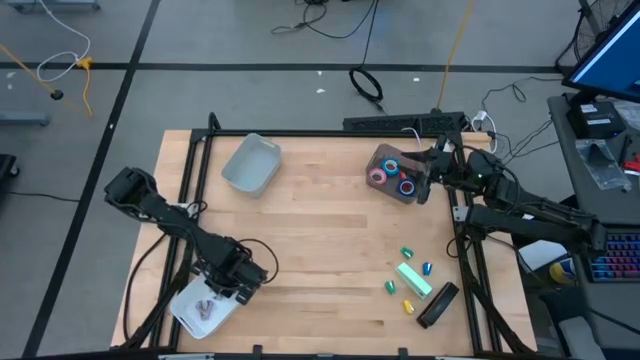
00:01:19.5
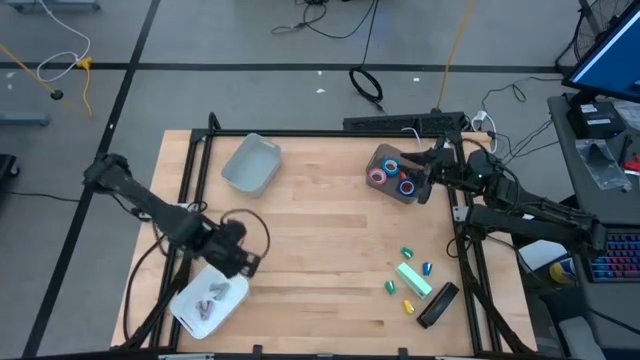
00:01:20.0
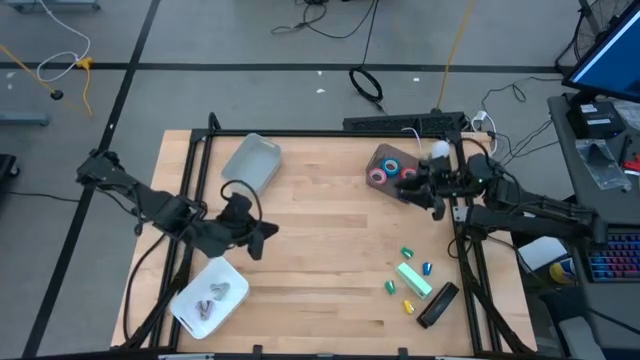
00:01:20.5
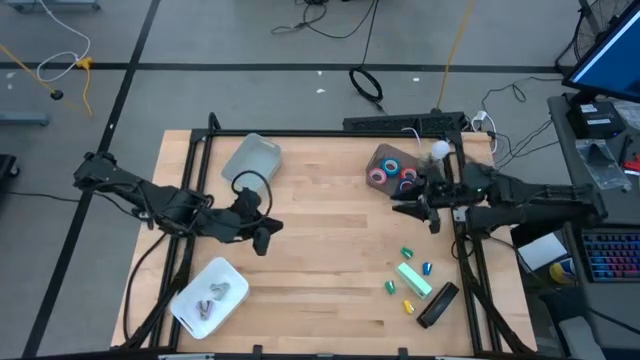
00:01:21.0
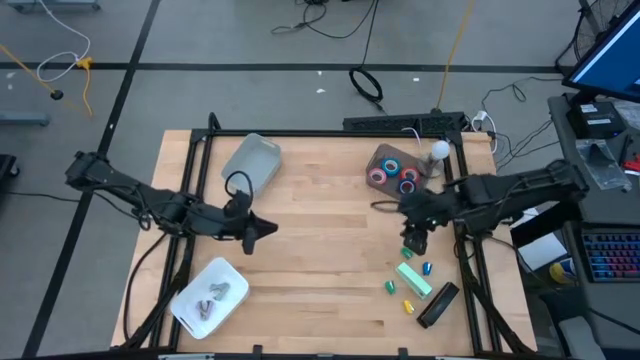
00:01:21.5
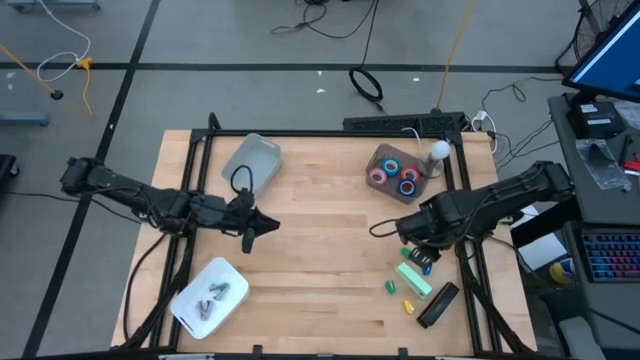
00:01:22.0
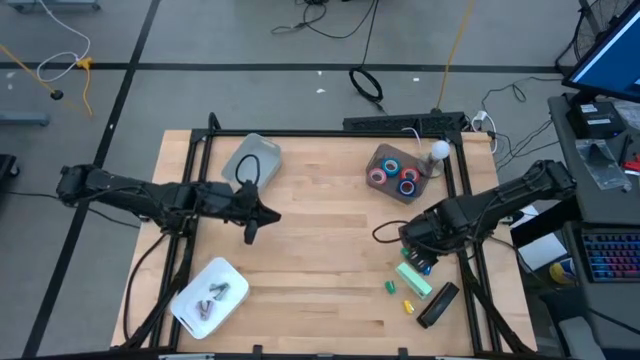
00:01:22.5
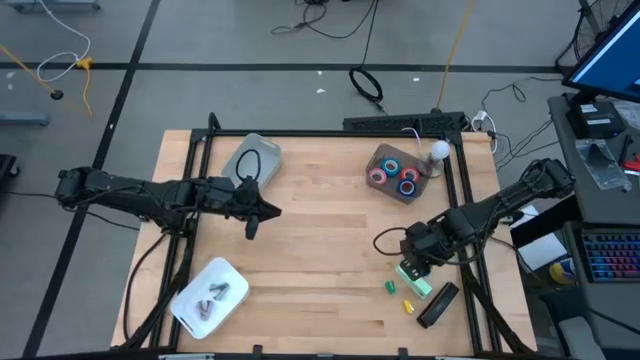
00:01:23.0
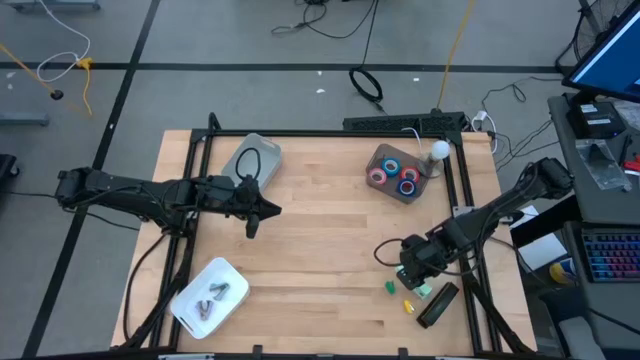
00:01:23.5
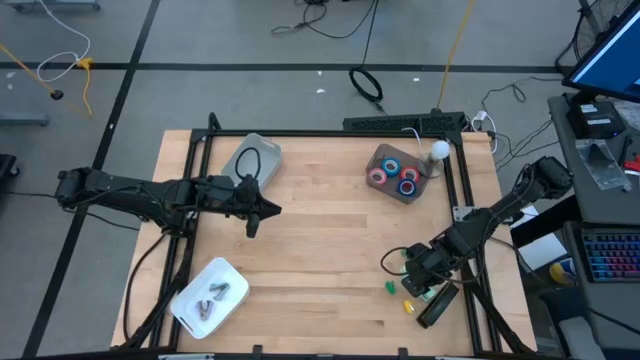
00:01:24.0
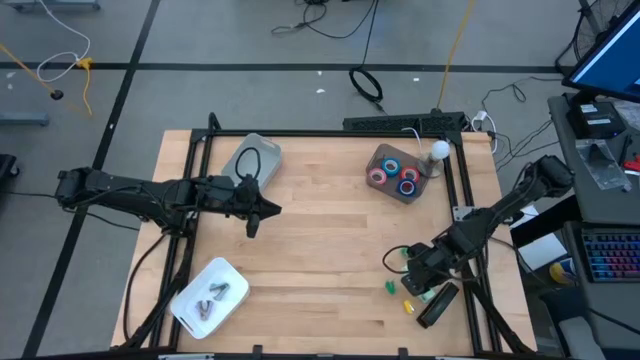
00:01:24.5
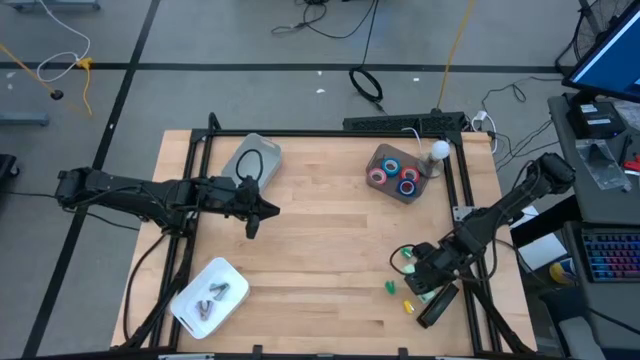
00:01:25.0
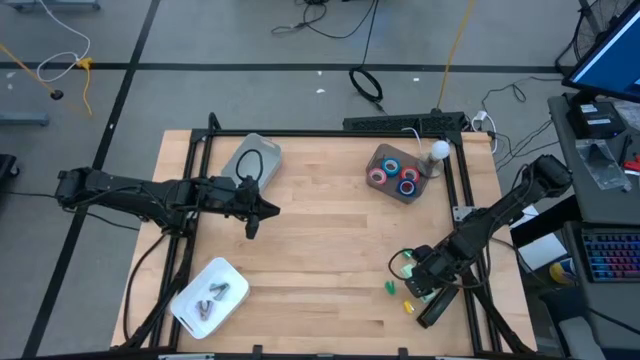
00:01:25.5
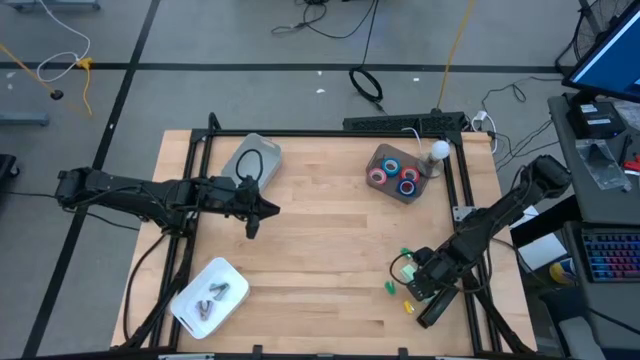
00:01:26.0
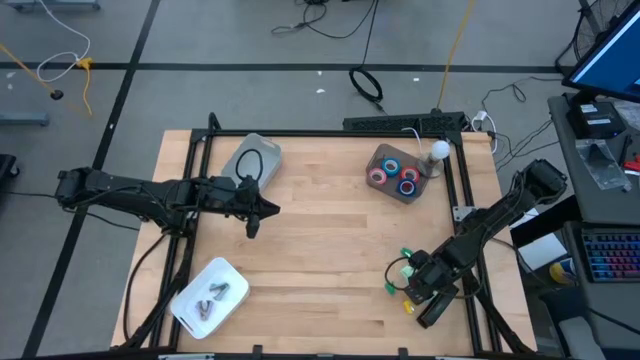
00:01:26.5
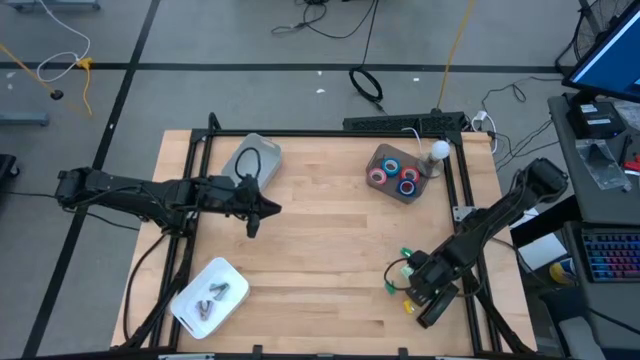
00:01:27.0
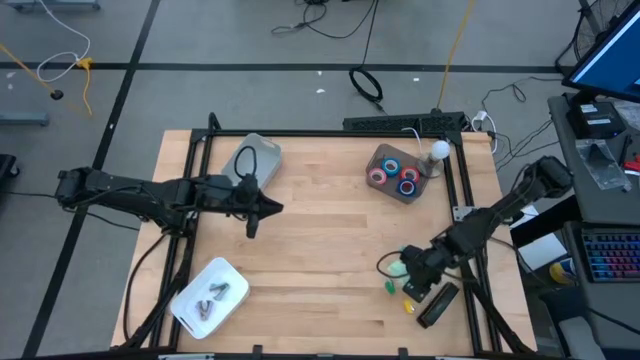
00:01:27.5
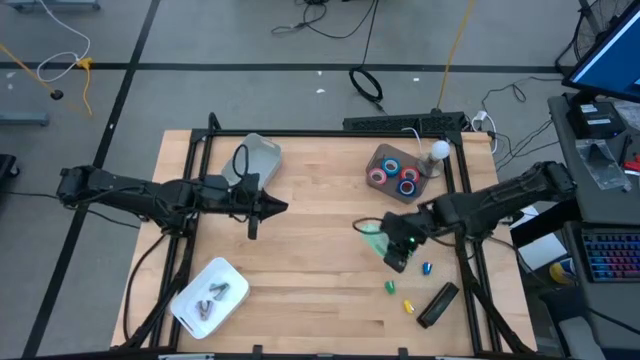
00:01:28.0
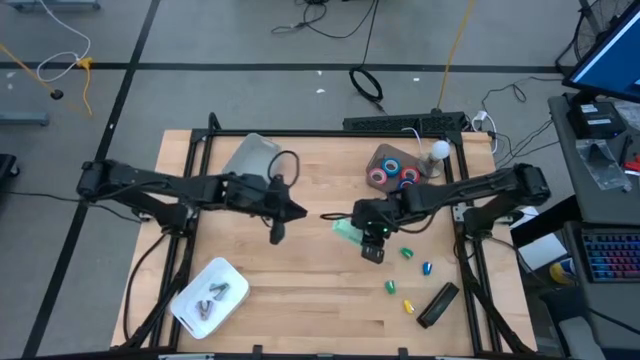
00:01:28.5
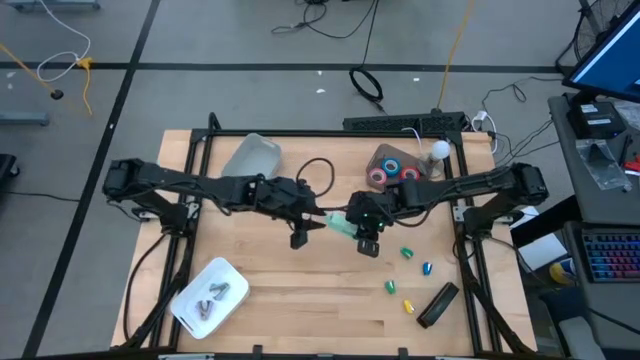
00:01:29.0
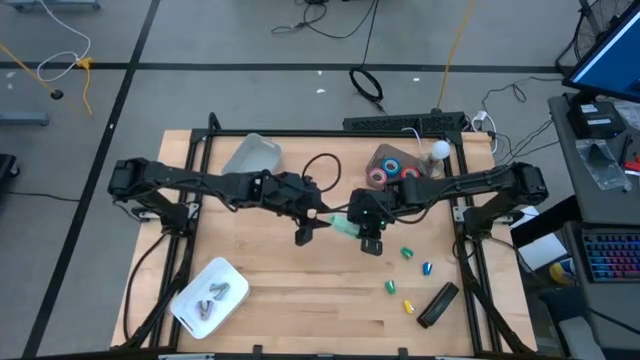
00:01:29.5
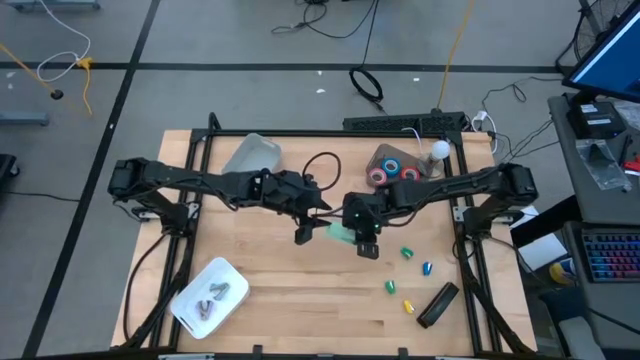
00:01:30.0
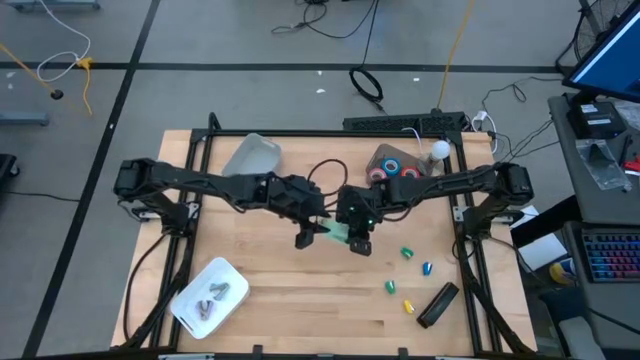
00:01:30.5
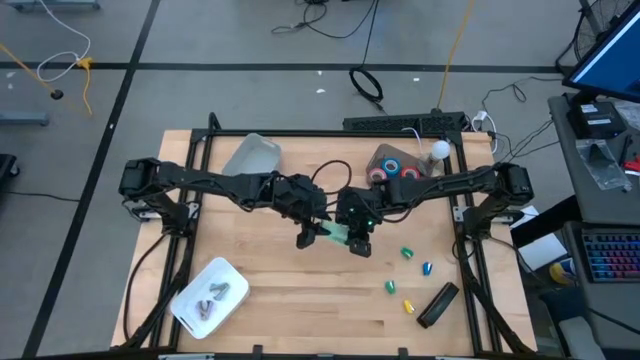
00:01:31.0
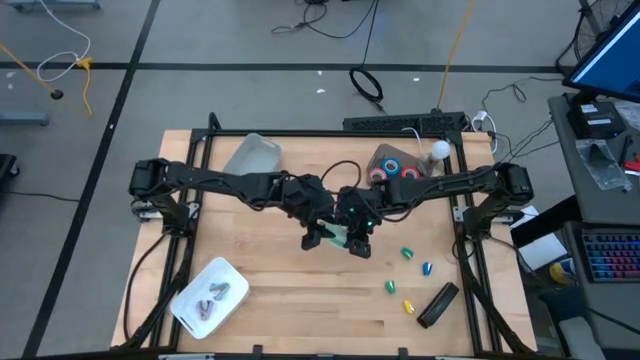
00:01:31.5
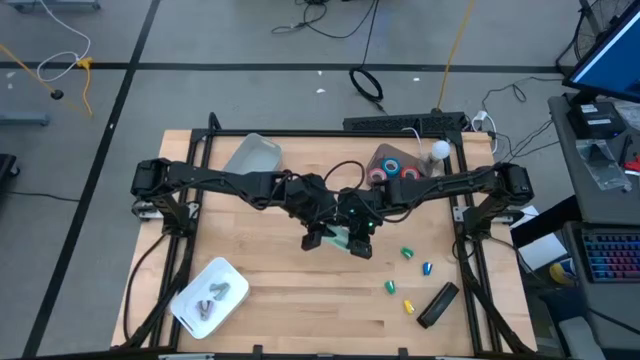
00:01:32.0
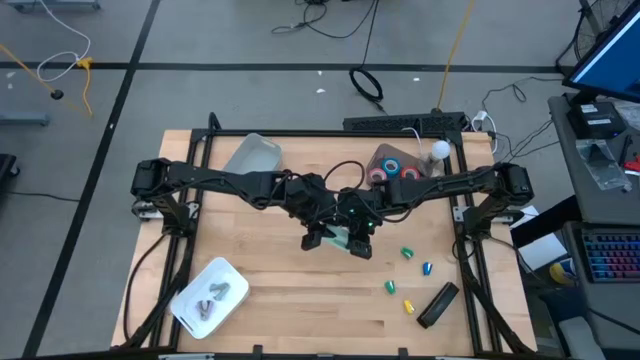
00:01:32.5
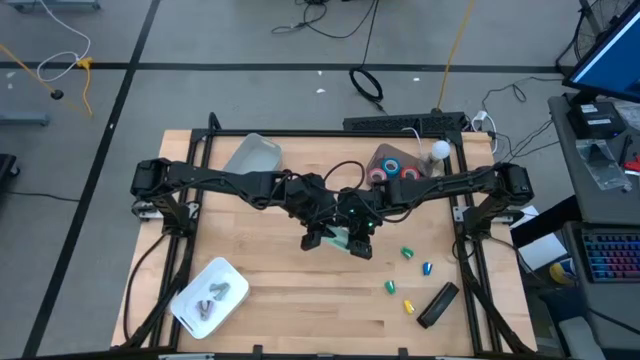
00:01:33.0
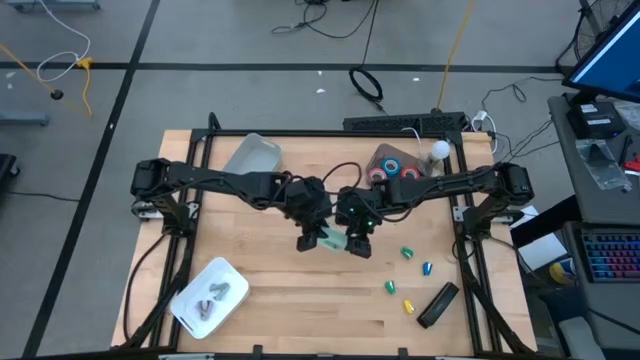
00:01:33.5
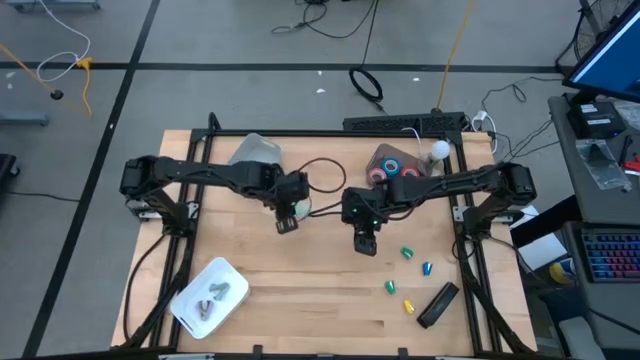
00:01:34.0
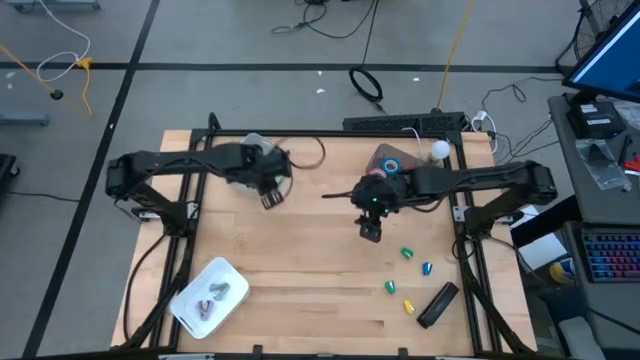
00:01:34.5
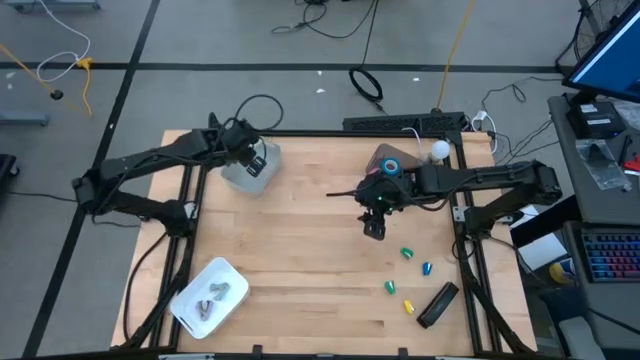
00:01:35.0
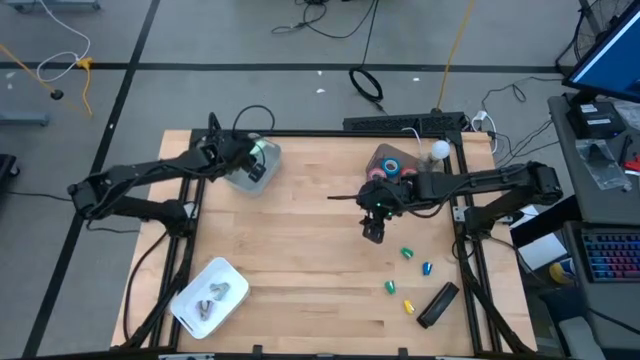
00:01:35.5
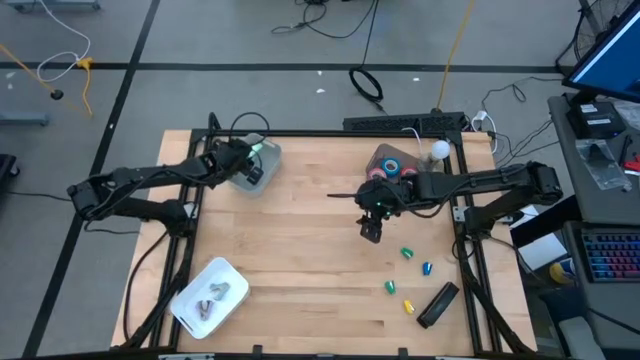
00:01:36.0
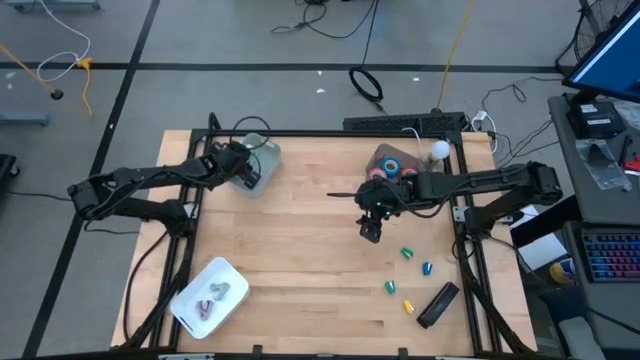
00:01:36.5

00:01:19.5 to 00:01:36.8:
Task: Pick and place Stapler, Stapler remover, tape
Put the large green stapler into the gray bin

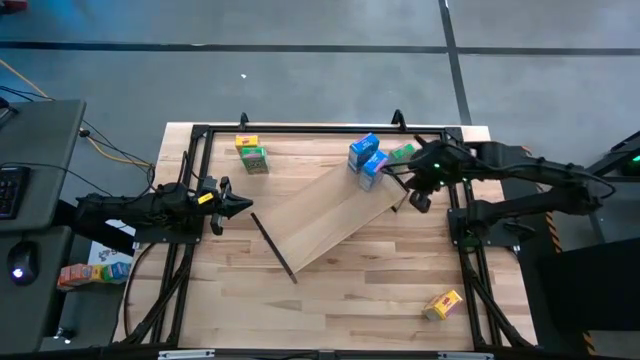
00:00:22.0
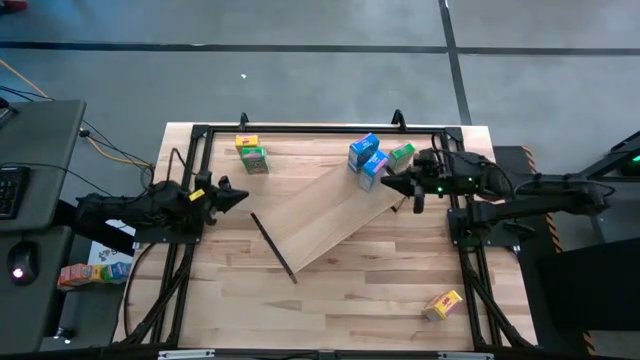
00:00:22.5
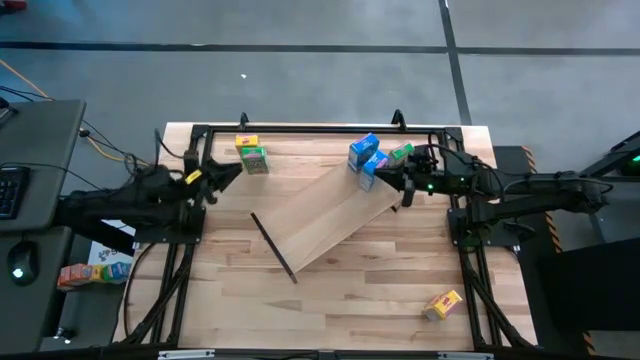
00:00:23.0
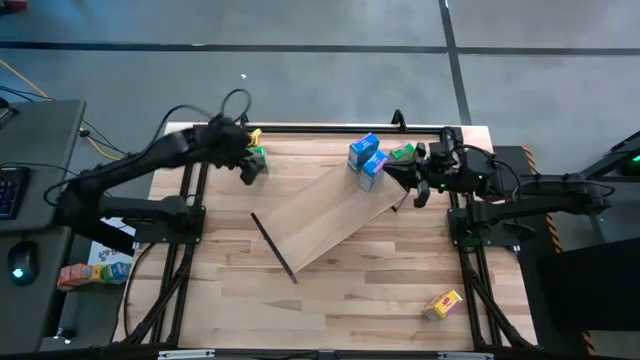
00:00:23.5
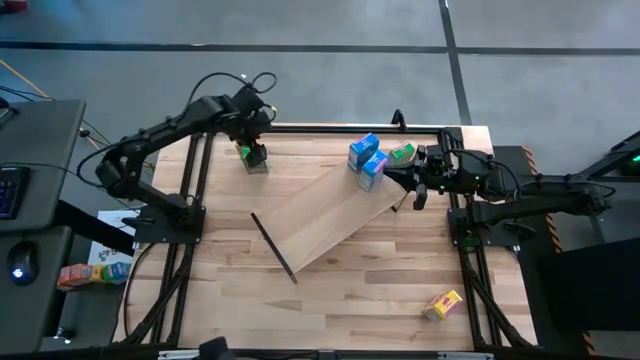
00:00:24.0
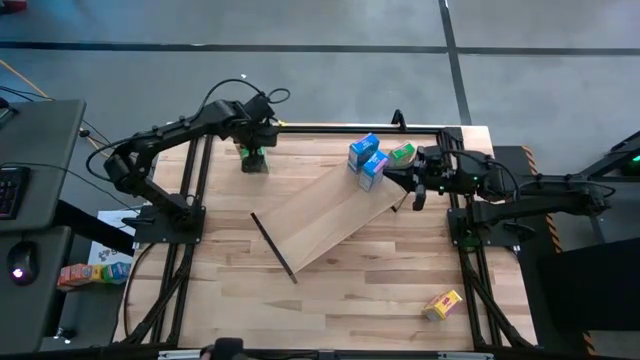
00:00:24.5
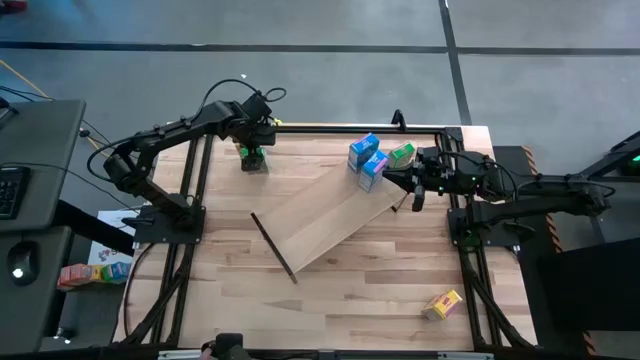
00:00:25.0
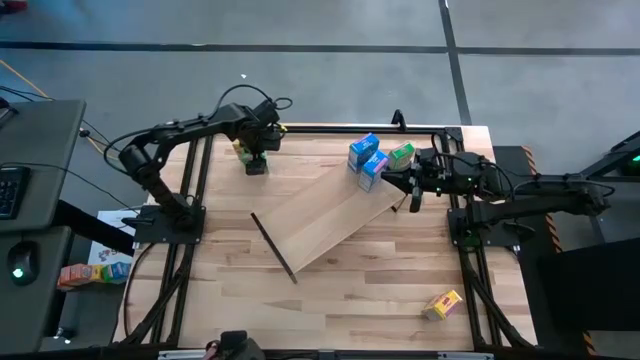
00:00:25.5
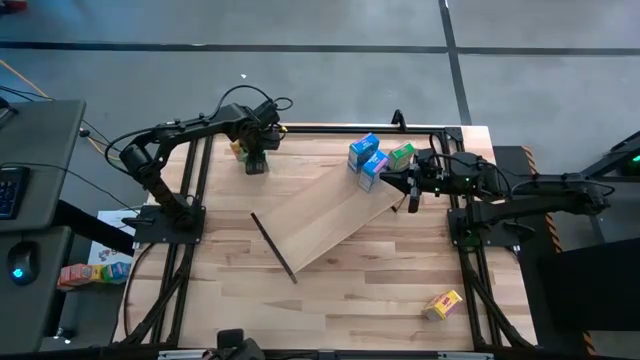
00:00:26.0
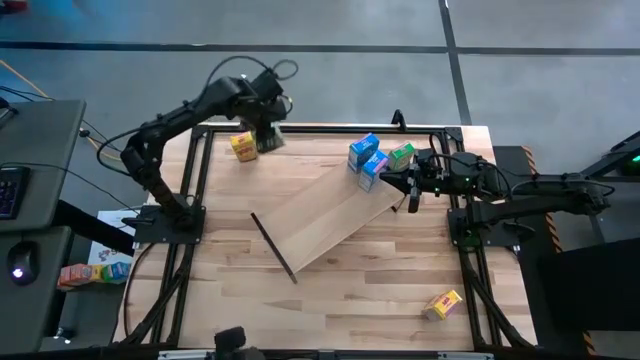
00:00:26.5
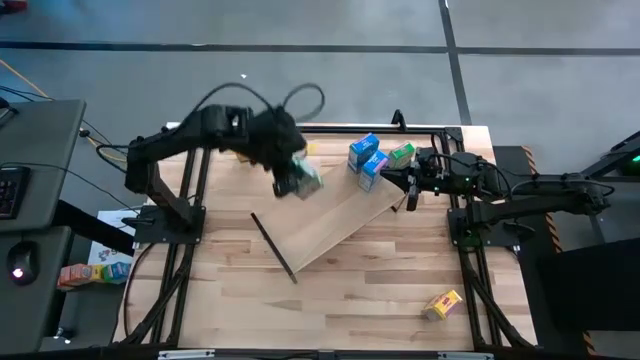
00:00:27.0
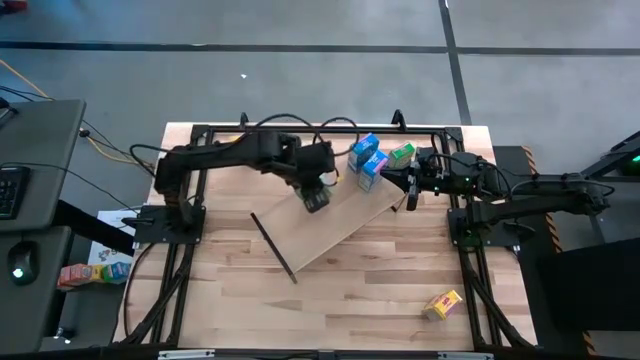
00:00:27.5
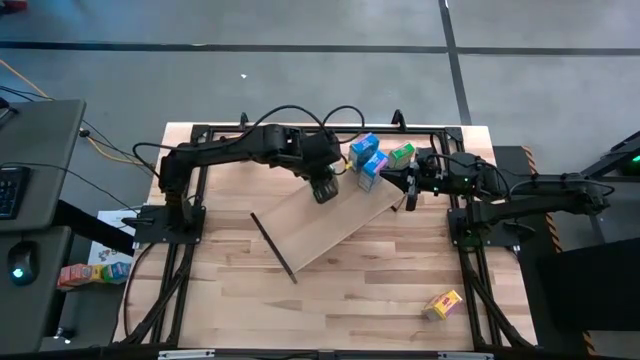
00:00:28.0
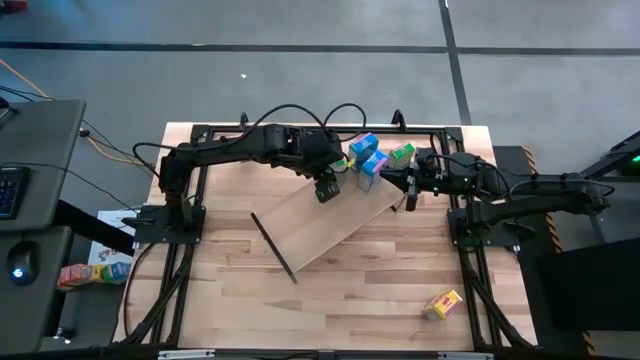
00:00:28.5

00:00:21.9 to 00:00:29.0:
Task: Stack cereal on shelf
Put the left green cereal box on the shelf
